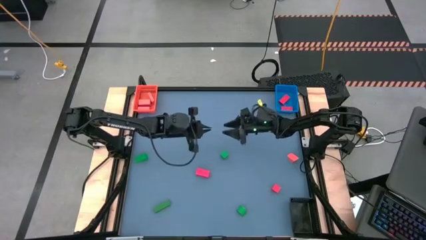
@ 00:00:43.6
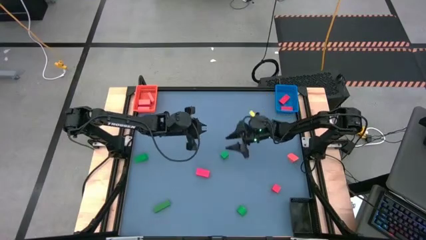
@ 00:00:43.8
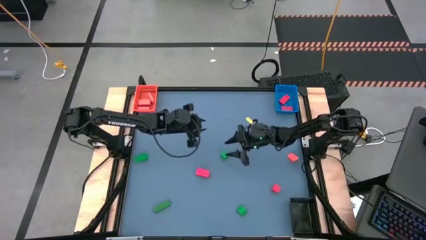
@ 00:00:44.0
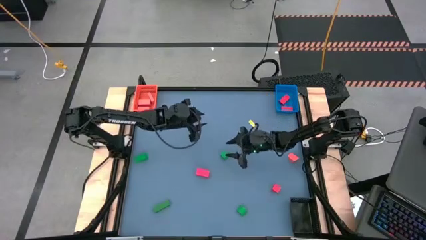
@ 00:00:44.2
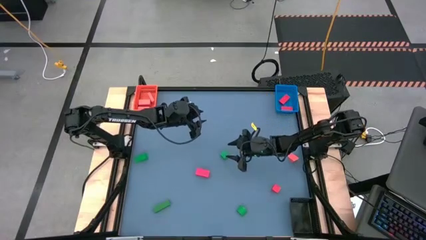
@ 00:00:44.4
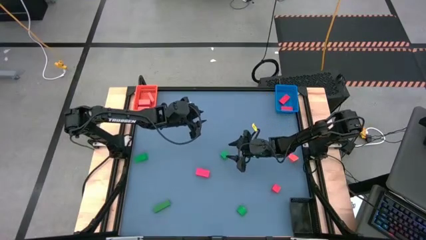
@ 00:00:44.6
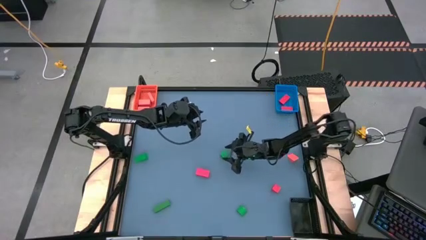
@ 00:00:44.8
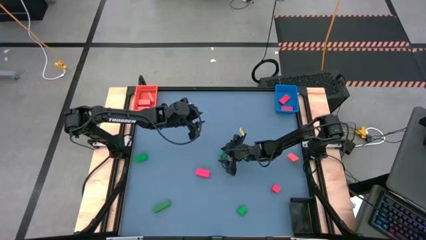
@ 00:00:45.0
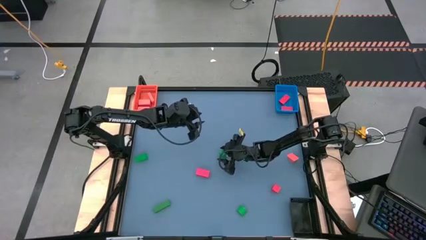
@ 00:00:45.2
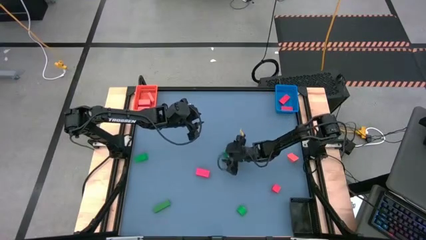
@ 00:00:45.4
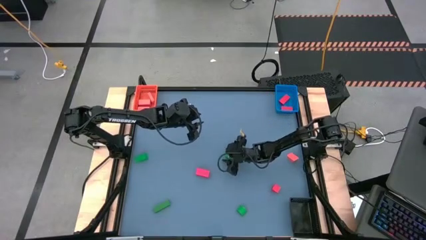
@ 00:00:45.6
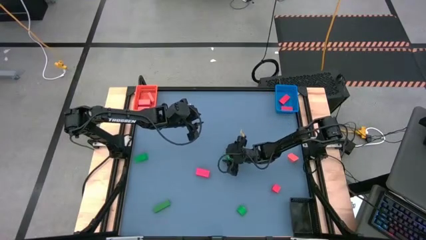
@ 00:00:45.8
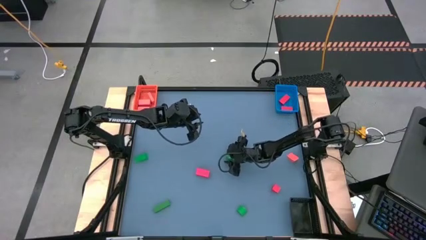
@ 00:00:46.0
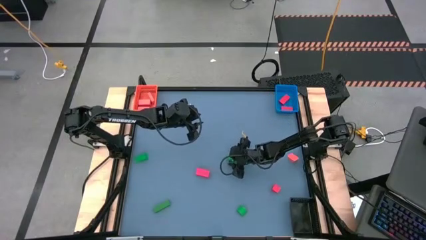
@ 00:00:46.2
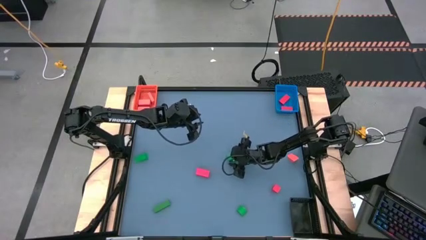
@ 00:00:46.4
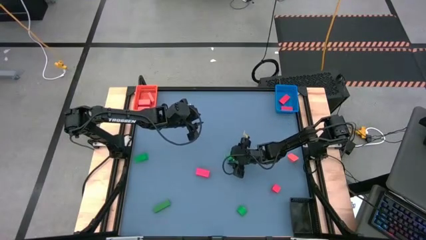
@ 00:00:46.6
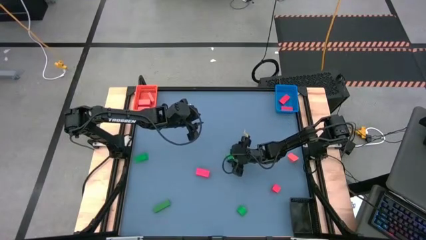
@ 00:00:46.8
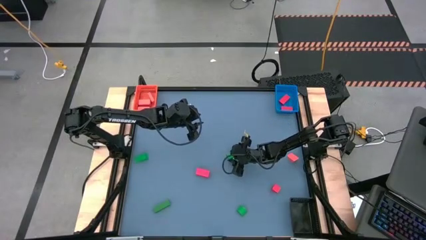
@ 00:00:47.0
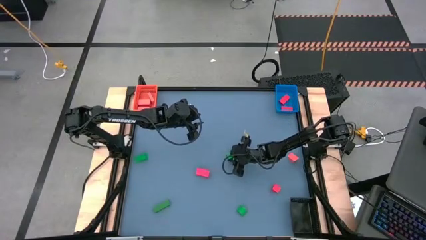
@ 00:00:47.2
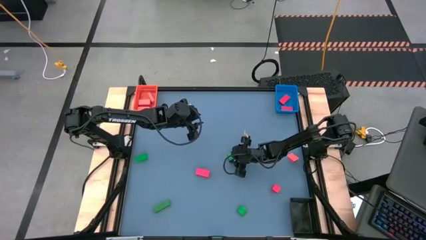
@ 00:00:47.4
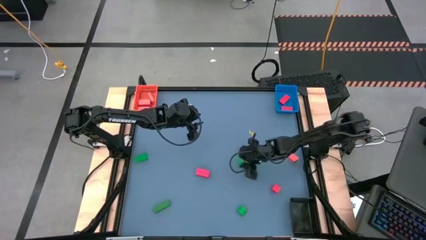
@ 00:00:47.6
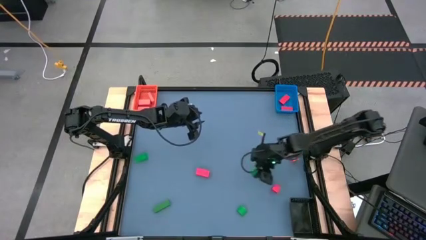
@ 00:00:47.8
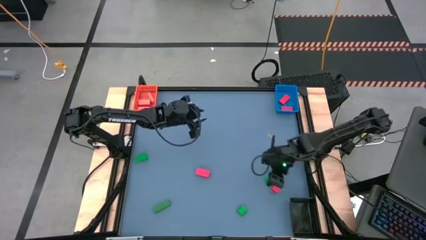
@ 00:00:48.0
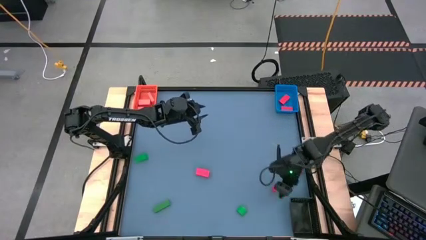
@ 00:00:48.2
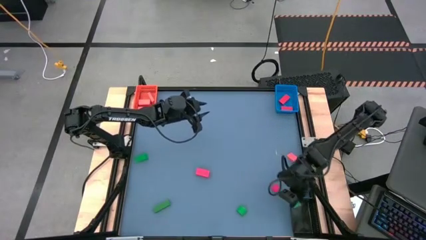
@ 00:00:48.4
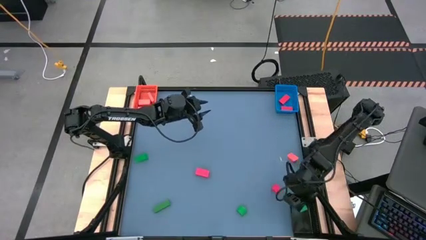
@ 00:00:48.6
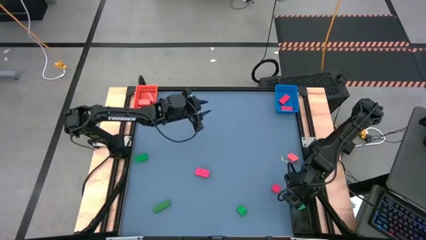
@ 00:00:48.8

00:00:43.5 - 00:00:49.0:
Task: Sort & place blocks by color
Put the green block into the black bin

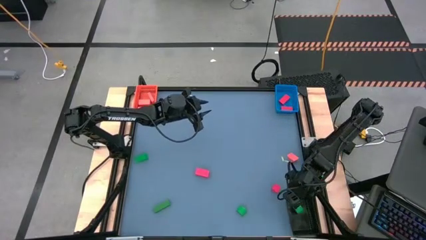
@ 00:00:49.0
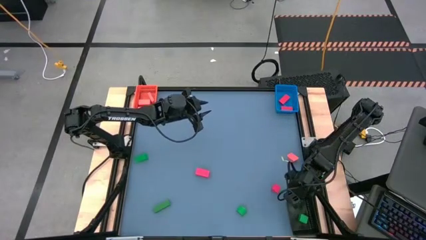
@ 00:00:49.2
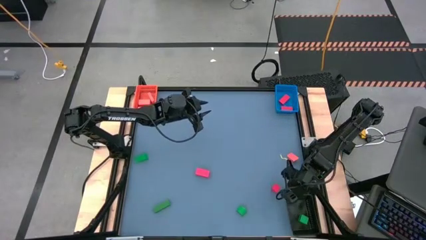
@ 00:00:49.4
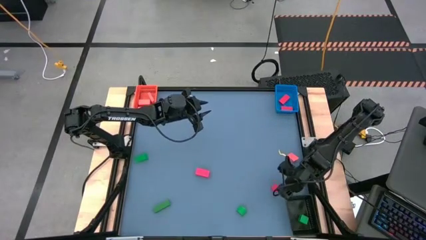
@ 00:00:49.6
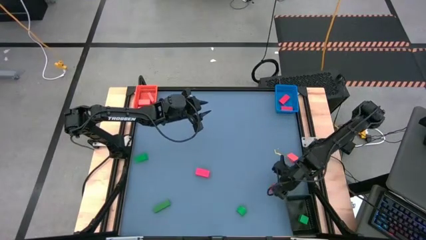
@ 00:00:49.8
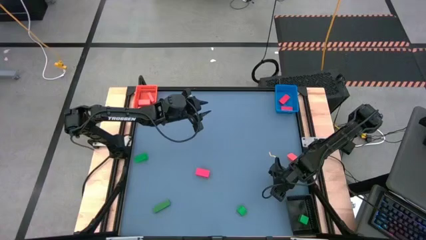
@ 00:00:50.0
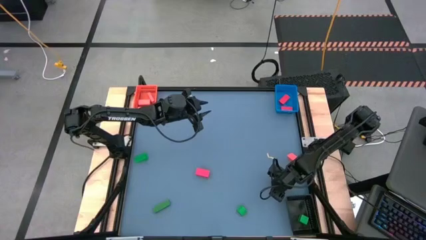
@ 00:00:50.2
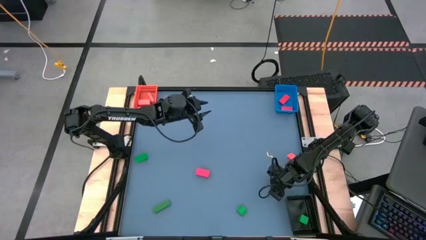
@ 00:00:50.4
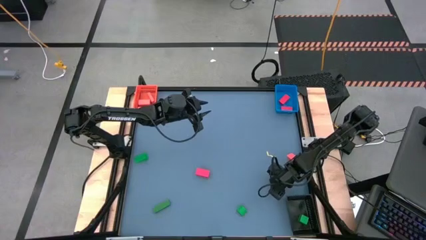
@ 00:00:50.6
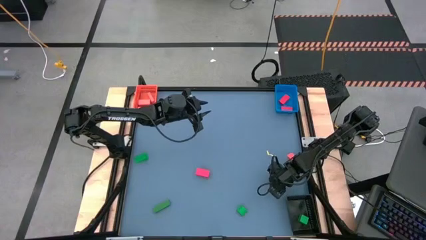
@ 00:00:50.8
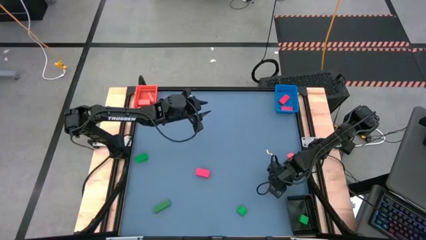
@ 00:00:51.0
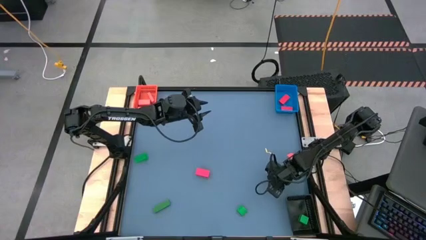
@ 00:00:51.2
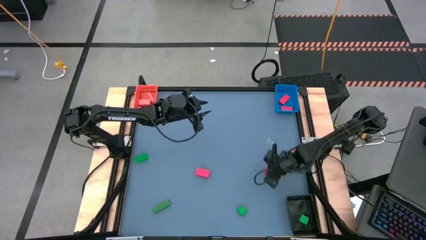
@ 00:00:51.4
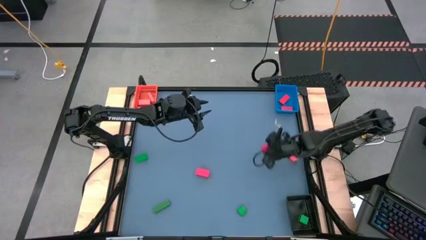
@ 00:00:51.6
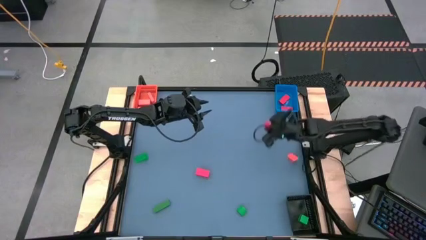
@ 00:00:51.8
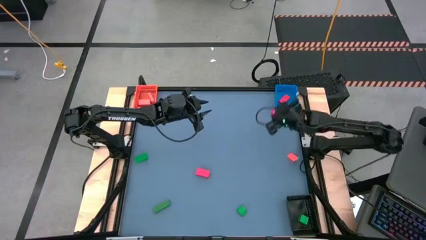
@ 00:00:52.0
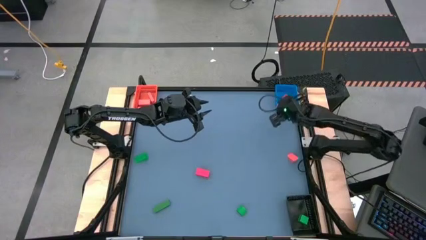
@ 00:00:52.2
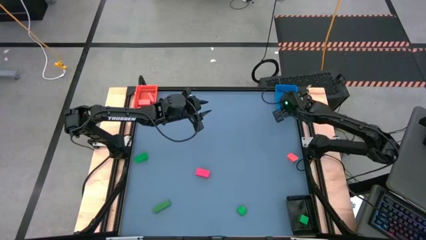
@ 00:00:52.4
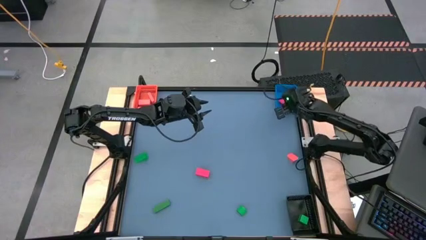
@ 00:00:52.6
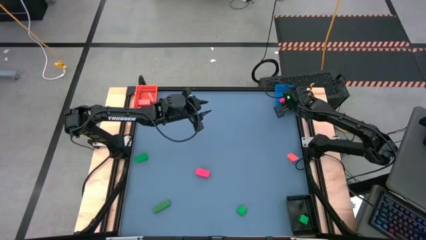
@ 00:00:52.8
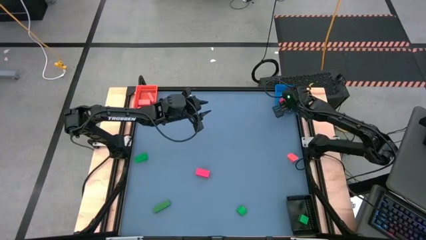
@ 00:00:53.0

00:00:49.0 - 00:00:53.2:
Put the pink block into the blue bin

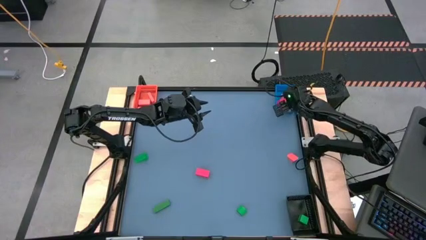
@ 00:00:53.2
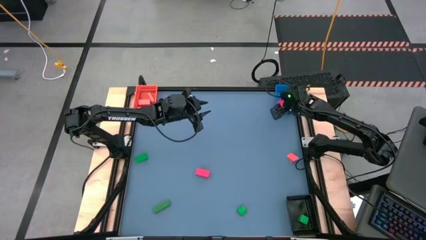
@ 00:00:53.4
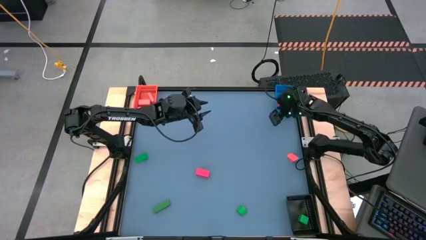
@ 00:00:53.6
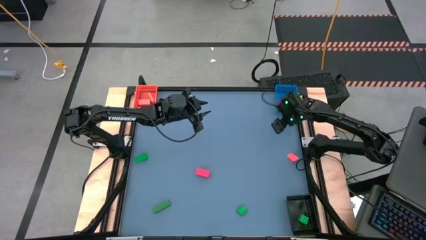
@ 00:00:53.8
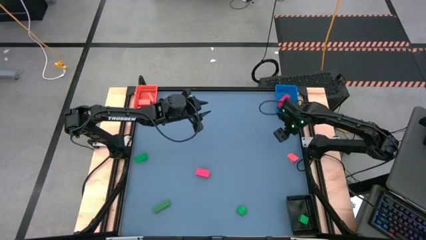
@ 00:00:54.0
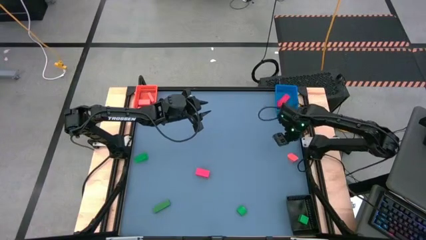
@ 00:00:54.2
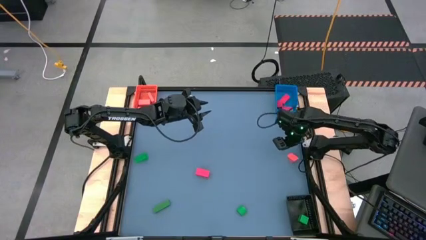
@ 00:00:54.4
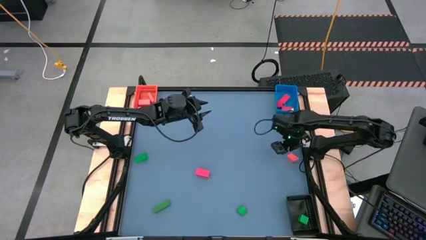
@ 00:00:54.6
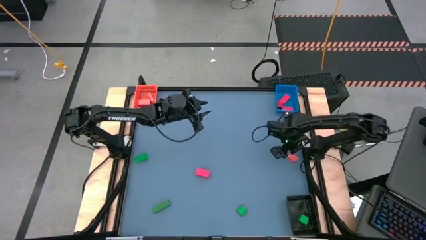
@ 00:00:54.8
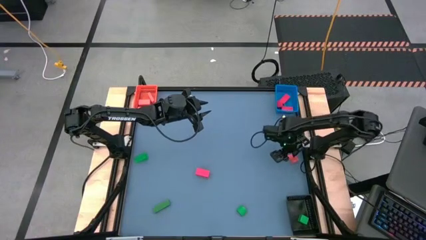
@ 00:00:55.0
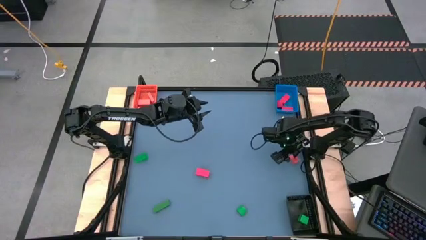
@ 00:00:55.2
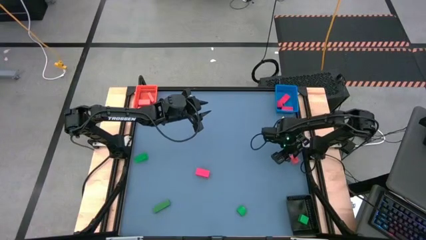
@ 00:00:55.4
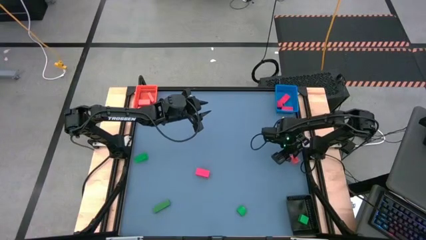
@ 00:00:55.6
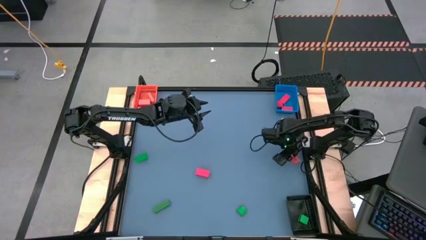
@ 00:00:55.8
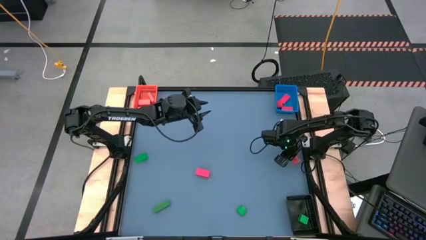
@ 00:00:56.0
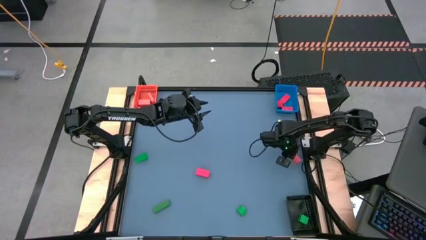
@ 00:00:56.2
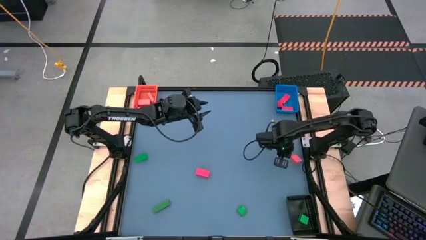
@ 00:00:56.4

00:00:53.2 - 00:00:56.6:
Put the orange block into the orange bin
